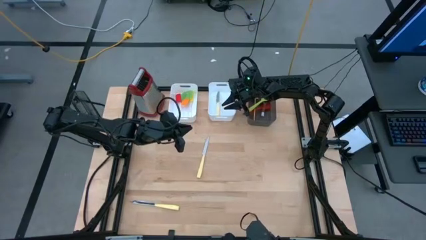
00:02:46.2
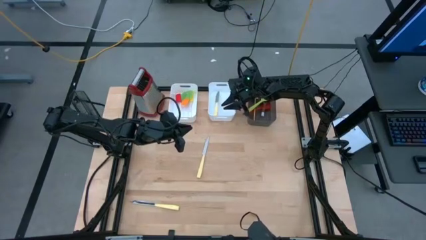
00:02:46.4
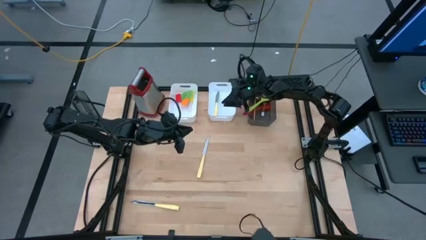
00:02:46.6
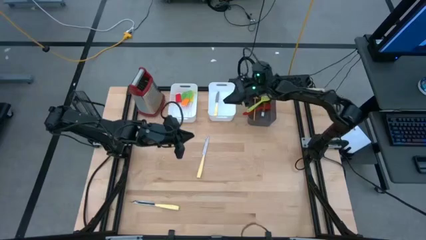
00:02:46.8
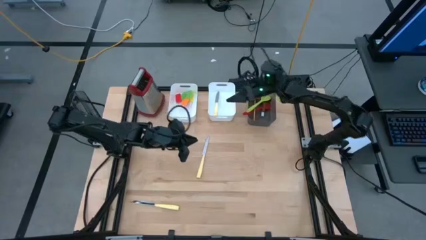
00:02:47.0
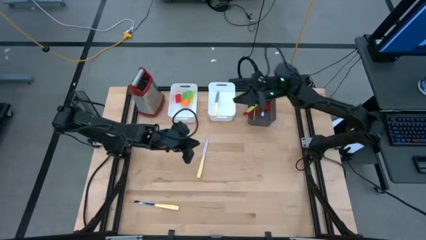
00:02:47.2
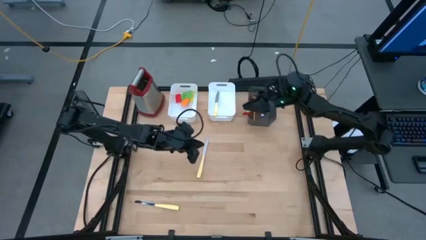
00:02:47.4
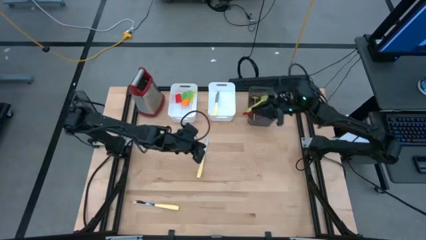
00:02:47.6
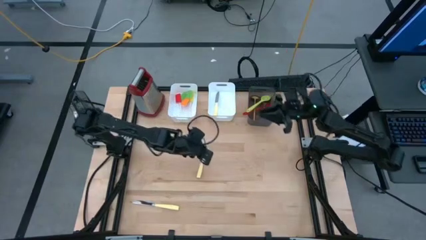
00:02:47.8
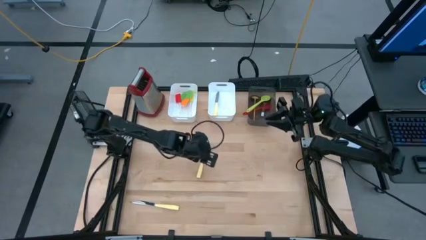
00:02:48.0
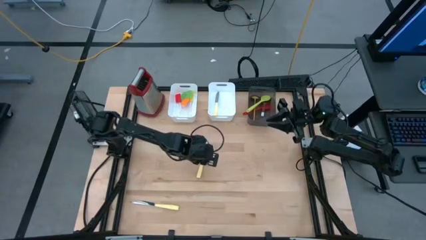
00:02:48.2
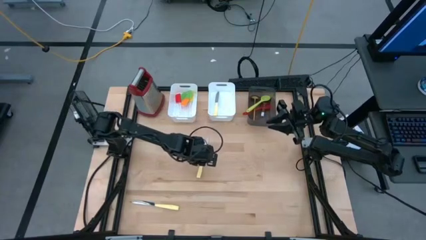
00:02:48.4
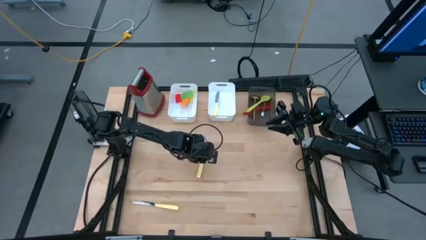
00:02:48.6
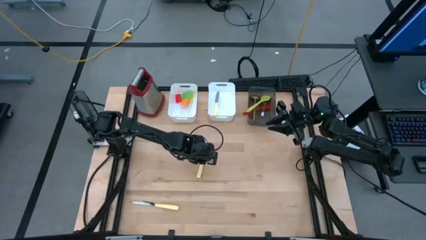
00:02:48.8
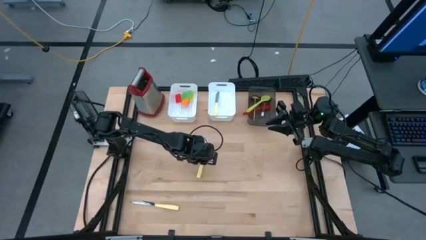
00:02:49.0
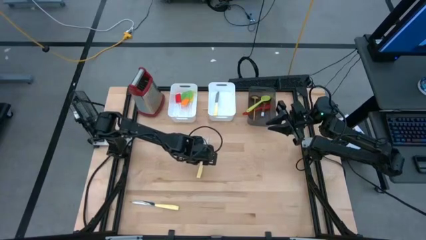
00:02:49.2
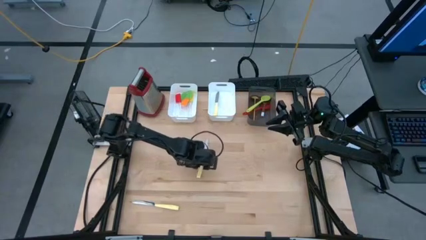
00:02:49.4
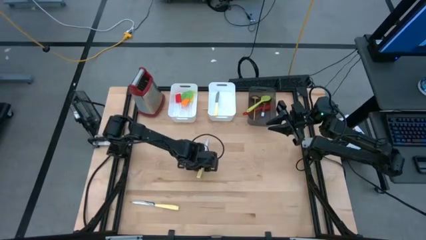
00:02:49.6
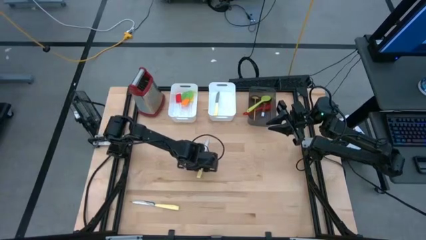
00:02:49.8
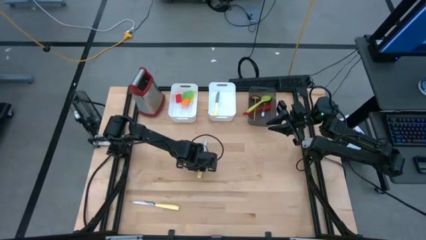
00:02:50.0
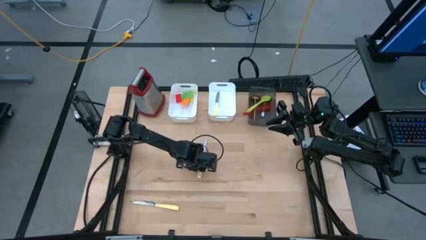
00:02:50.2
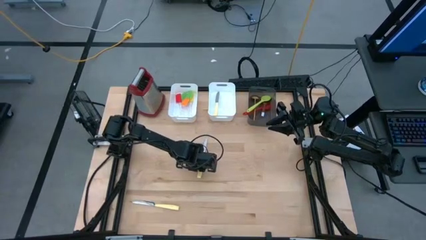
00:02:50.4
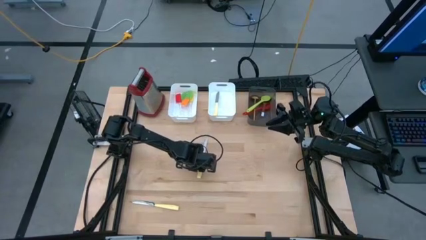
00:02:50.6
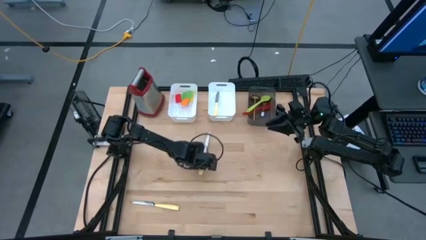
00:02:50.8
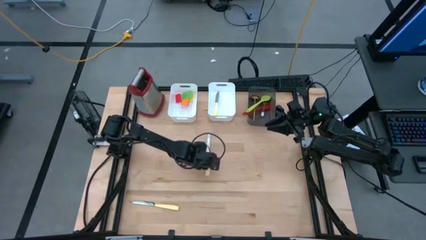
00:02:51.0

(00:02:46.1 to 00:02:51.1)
Task: Pick & Place Kitchen Items
Put the top knife into the right white bin

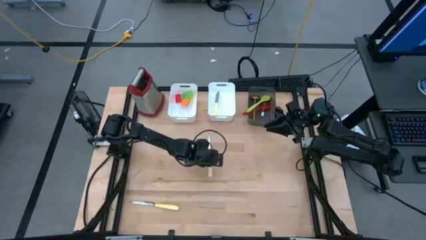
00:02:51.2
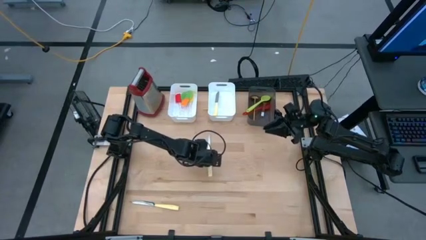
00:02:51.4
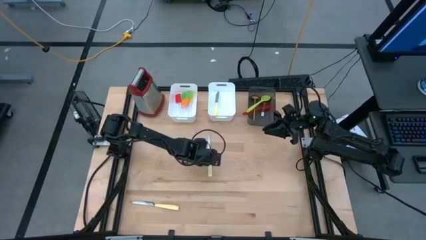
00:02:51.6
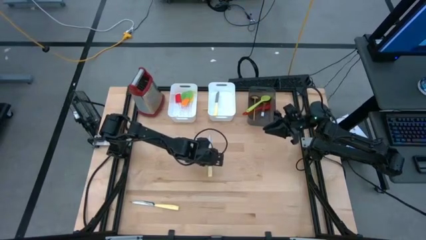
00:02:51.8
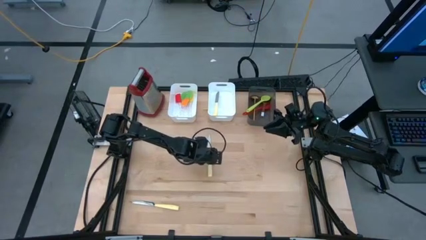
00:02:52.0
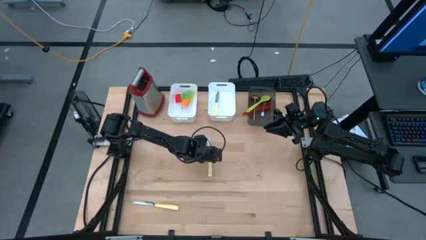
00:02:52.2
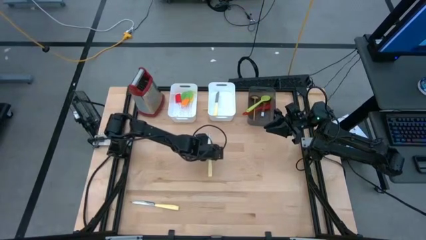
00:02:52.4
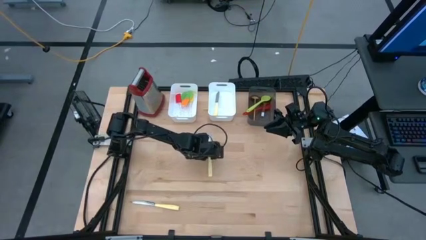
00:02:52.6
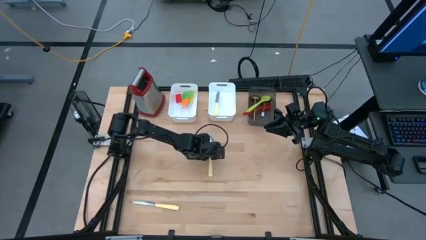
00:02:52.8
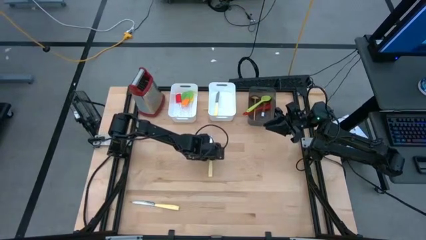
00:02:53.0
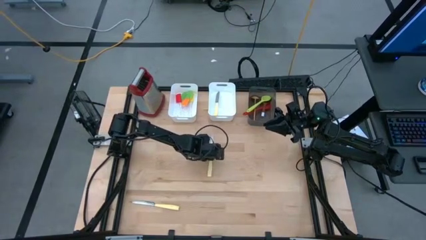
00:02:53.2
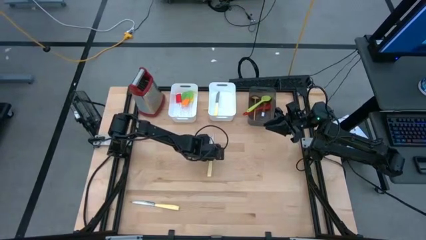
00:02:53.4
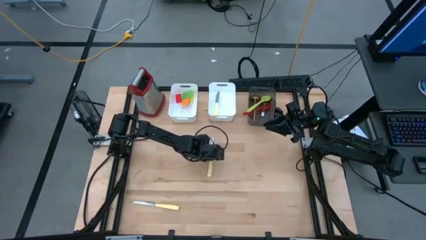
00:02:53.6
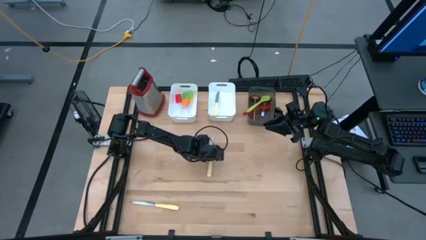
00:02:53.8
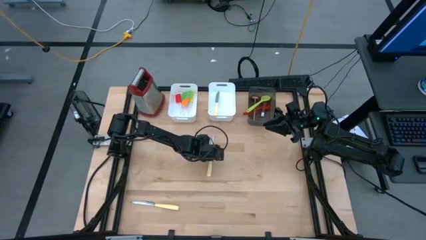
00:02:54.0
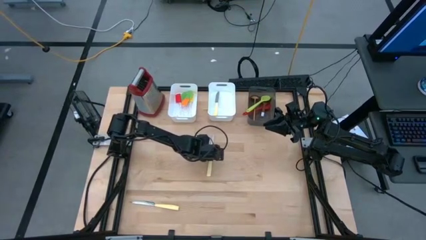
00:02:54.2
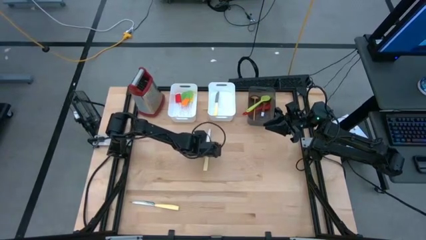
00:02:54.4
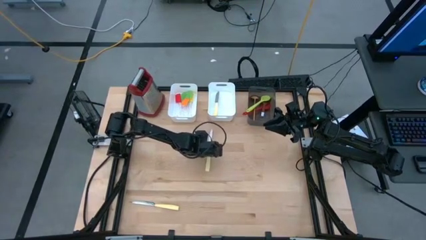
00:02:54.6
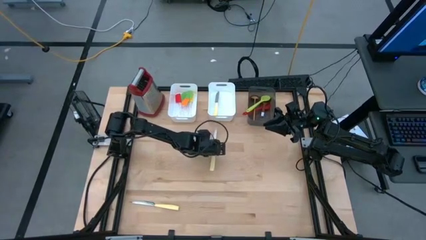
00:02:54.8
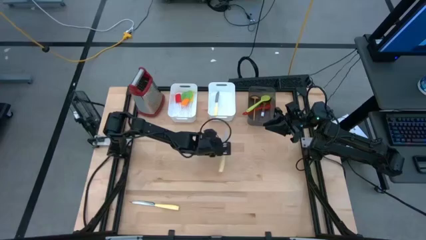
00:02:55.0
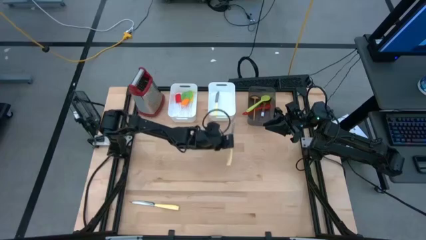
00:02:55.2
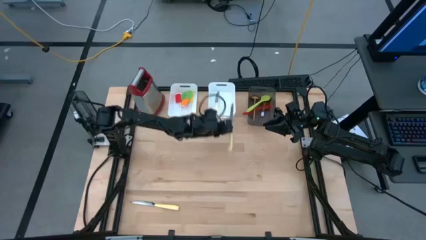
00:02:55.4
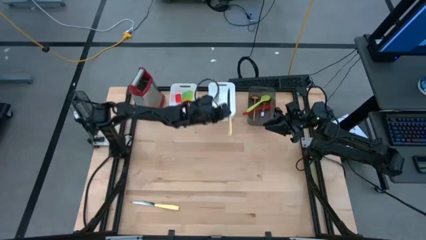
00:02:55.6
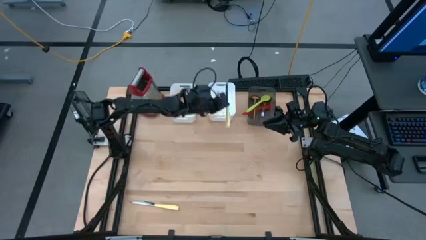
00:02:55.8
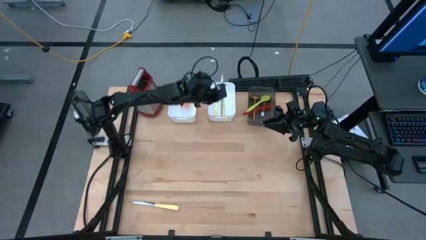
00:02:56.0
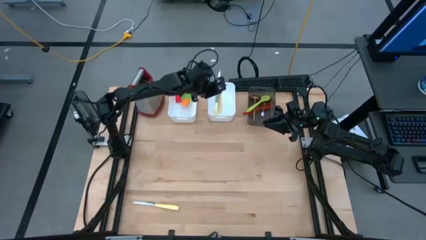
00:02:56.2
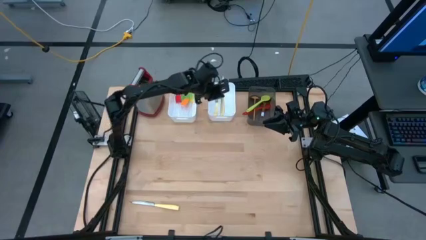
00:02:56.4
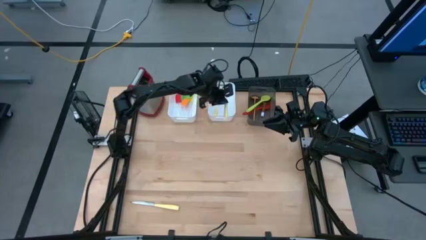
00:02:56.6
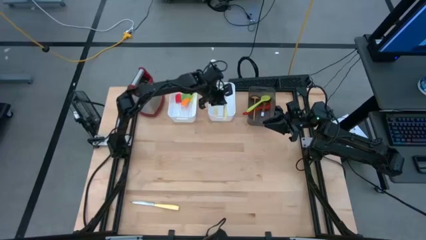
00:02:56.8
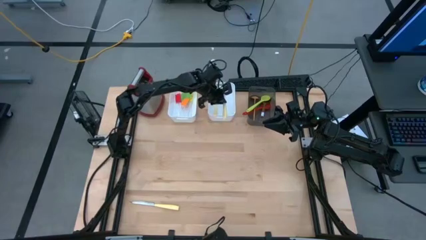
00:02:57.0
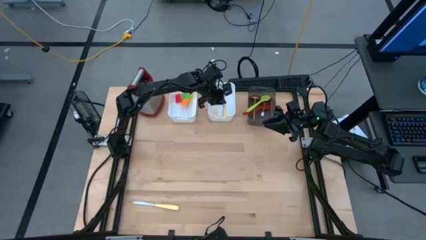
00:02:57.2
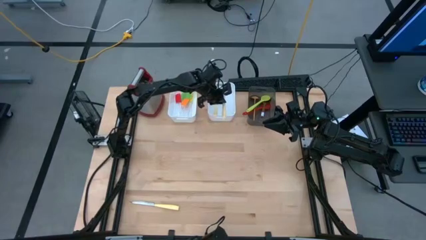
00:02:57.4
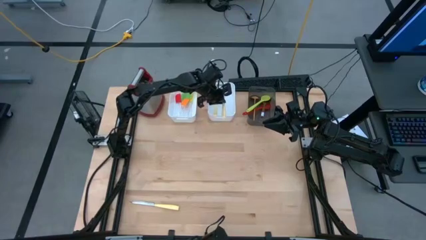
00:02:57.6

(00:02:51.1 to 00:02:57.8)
Put the top knife into the right white bin

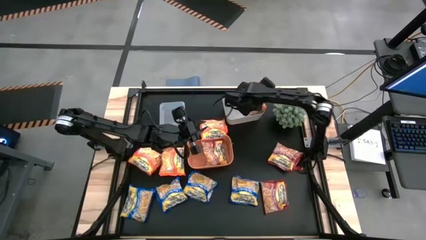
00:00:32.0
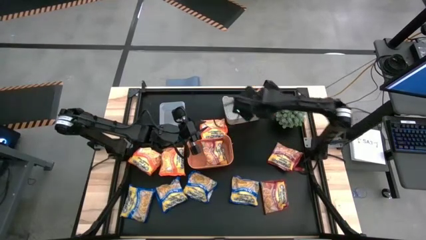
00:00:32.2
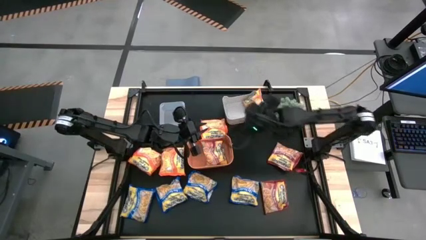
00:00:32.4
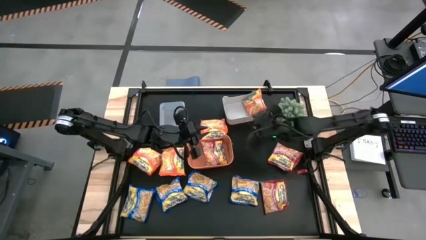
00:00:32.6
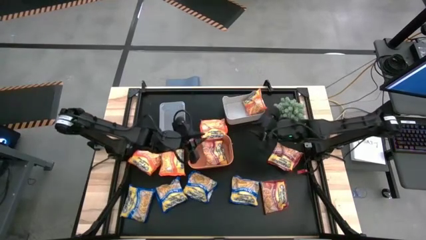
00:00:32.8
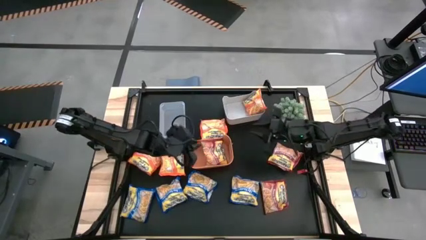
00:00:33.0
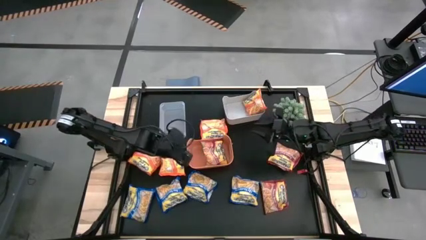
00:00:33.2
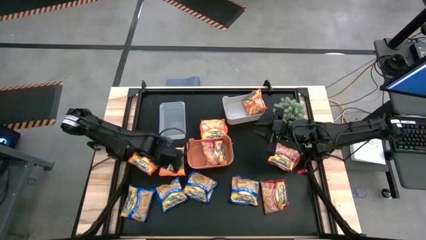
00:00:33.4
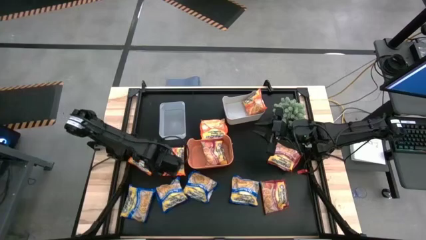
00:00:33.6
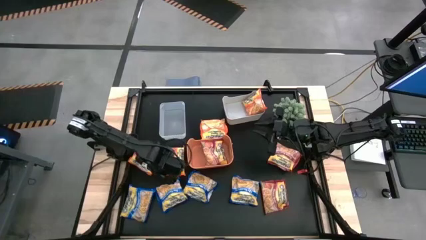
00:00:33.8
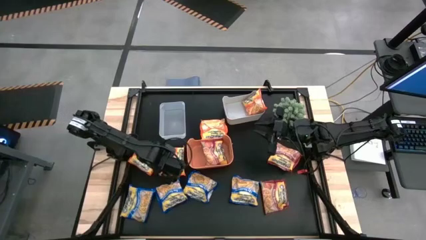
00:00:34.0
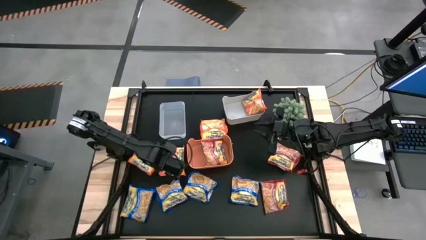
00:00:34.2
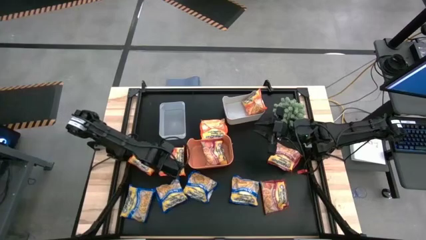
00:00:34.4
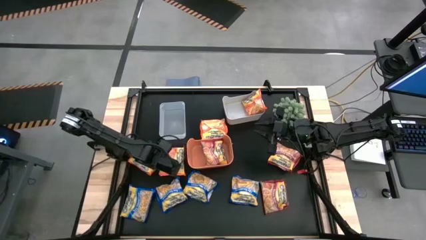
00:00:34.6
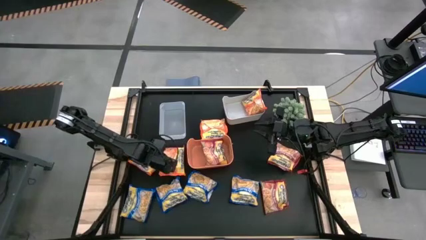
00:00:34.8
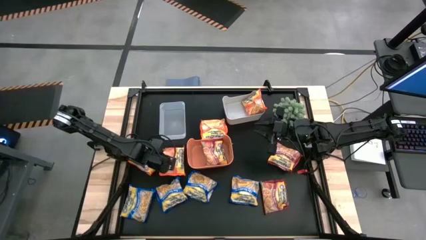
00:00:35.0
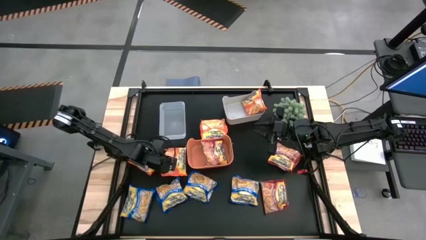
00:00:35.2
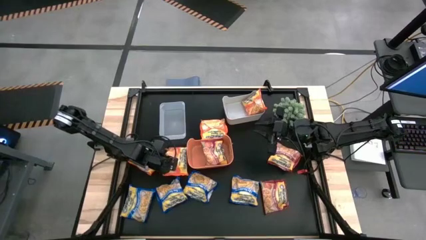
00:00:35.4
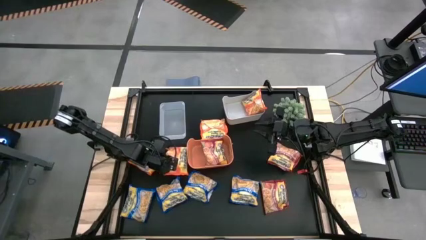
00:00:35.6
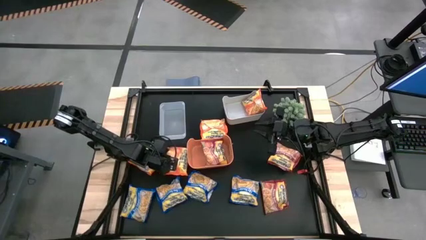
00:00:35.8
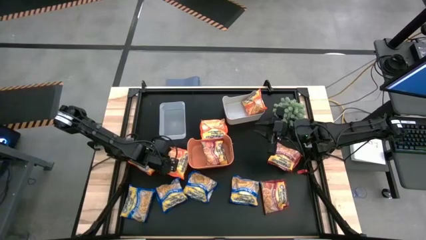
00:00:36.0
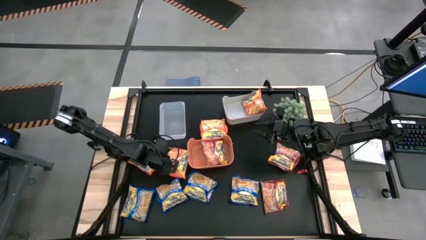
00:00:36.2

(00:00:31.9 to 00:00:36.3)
Task: Sort Maruchan noodles
Put the middle orange noodle packet into the white bin
